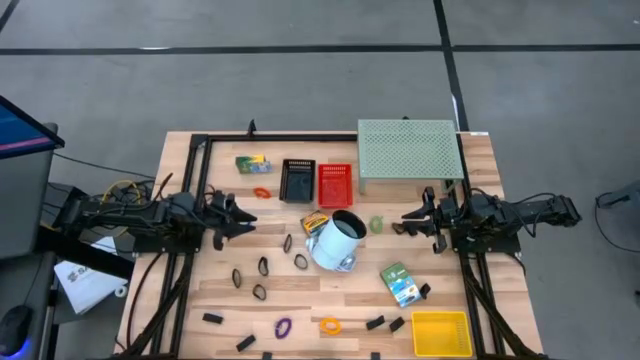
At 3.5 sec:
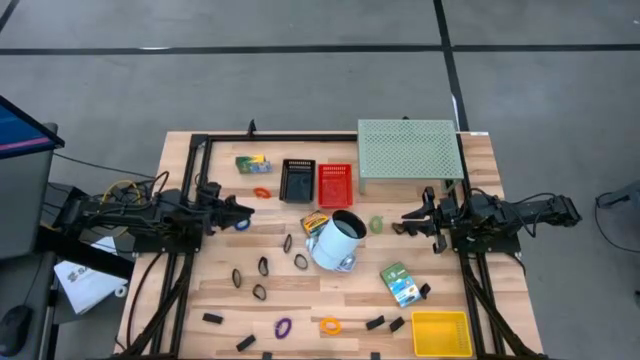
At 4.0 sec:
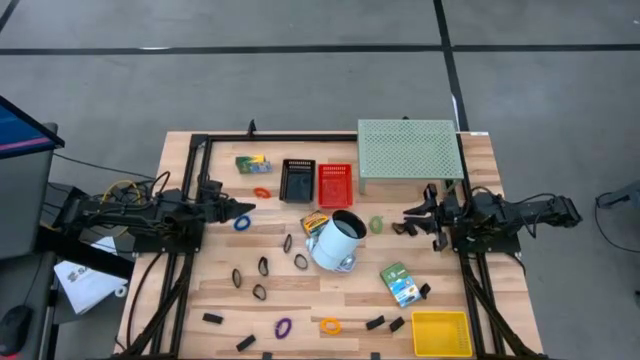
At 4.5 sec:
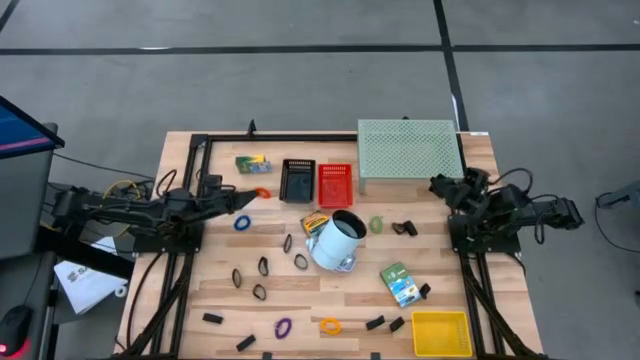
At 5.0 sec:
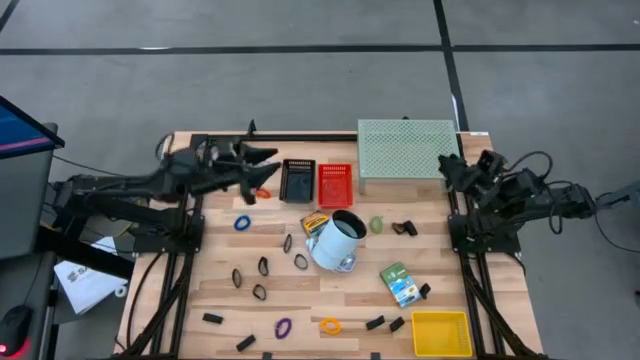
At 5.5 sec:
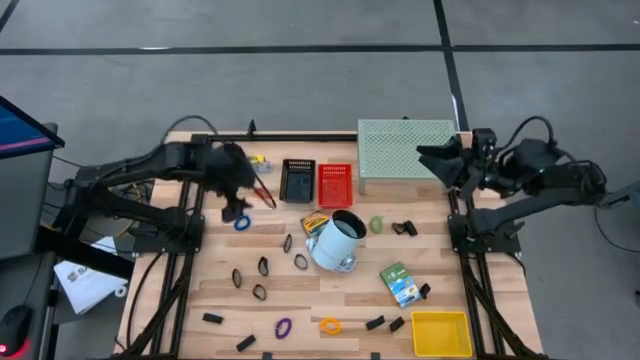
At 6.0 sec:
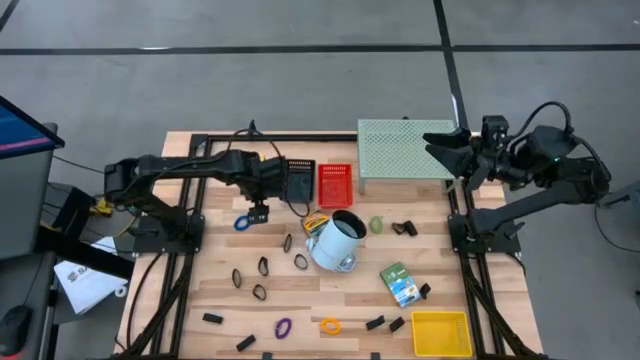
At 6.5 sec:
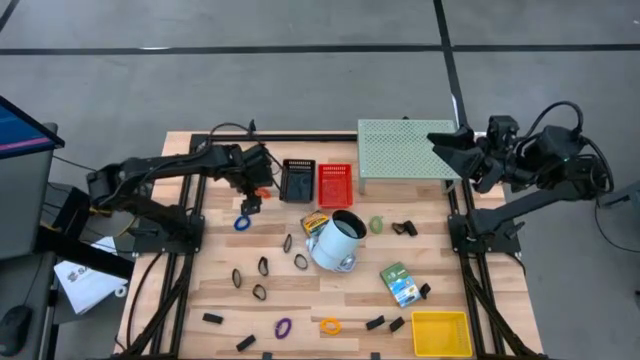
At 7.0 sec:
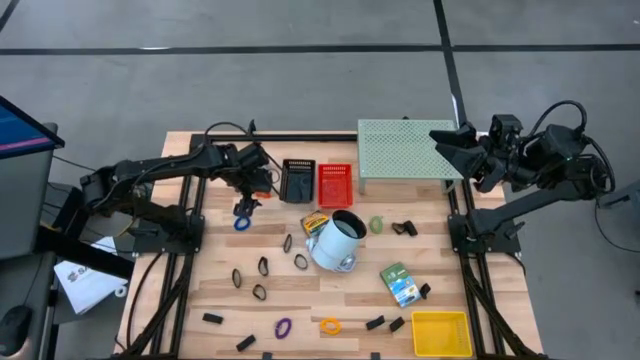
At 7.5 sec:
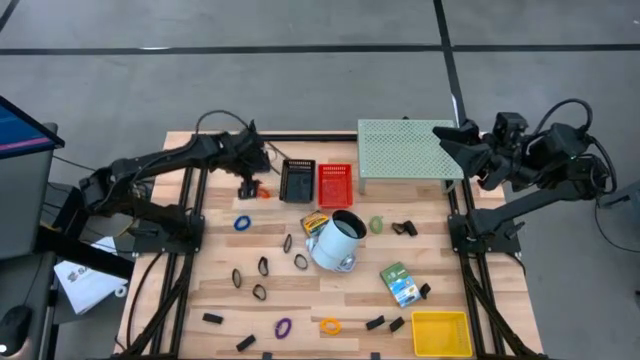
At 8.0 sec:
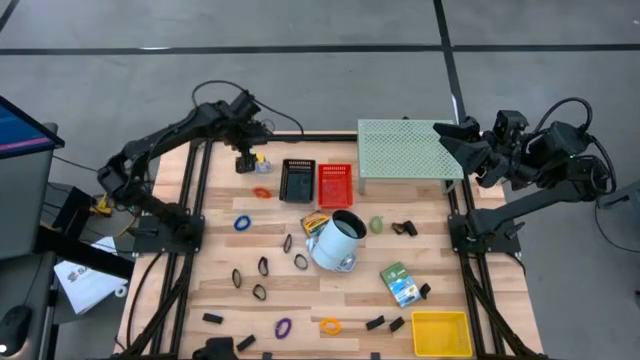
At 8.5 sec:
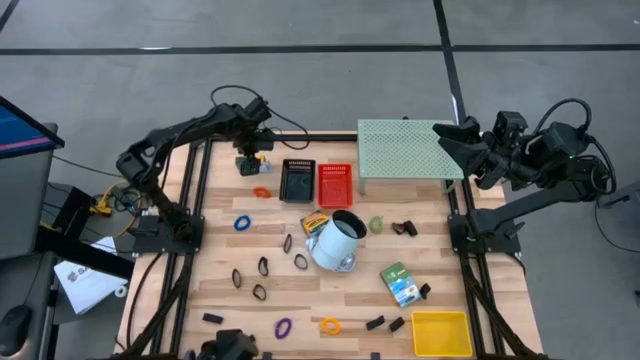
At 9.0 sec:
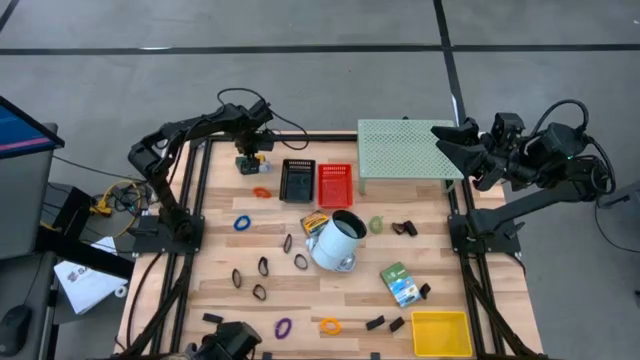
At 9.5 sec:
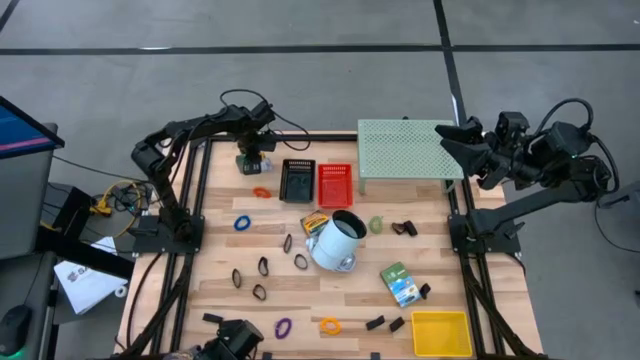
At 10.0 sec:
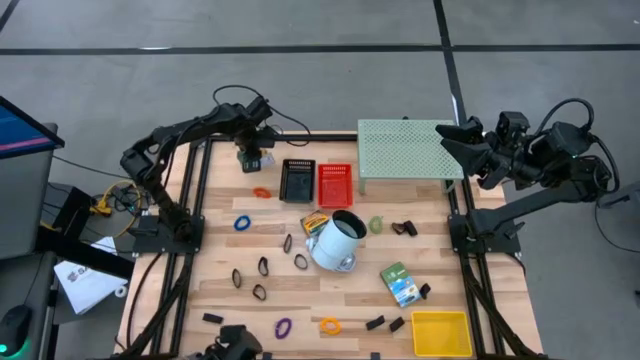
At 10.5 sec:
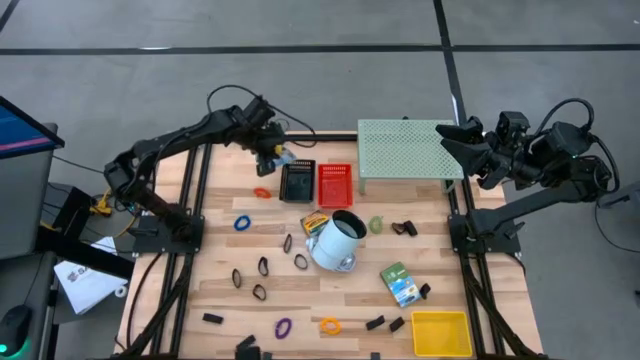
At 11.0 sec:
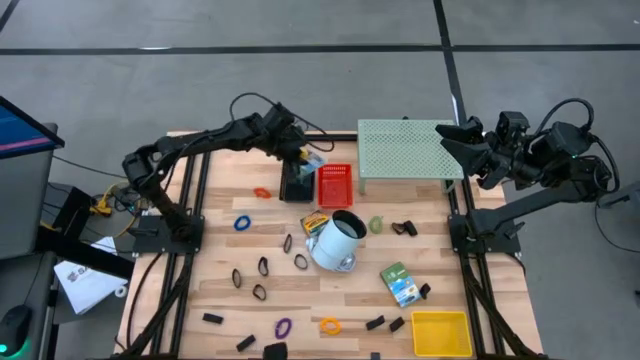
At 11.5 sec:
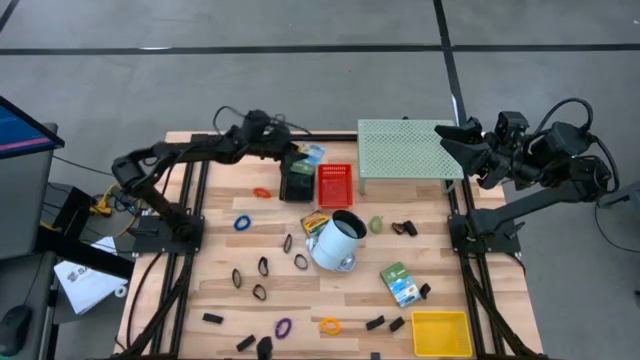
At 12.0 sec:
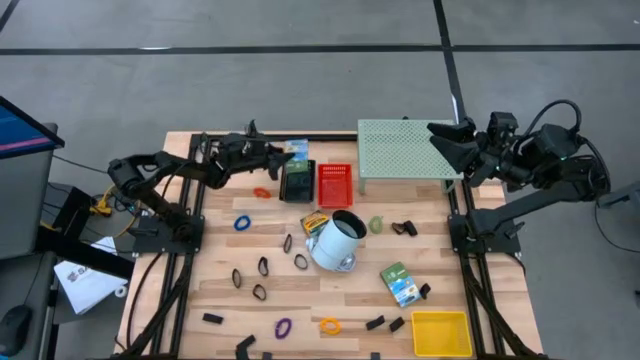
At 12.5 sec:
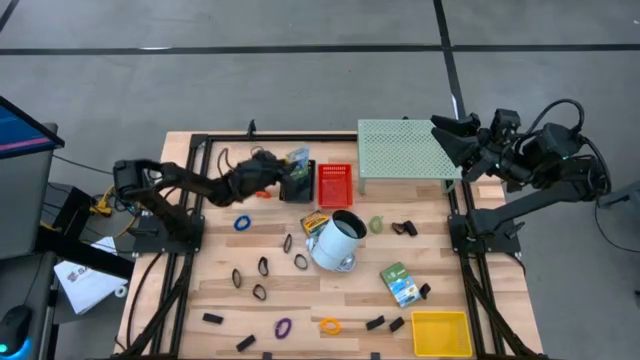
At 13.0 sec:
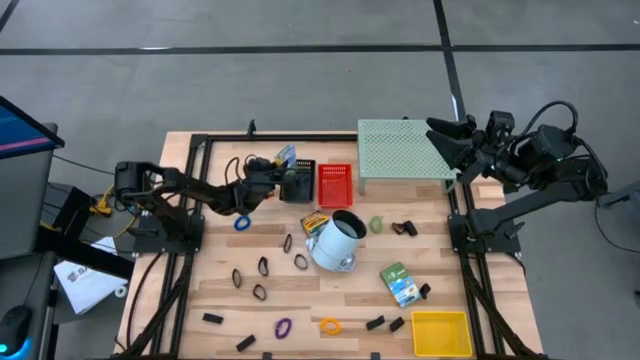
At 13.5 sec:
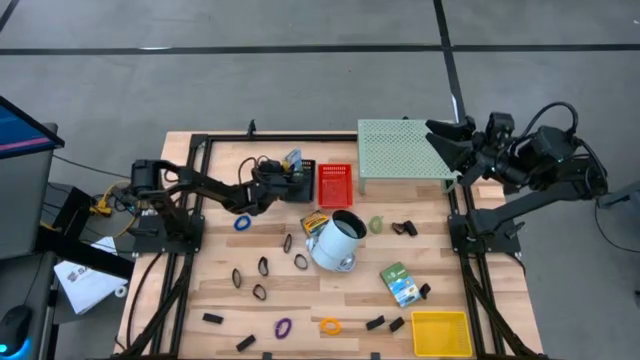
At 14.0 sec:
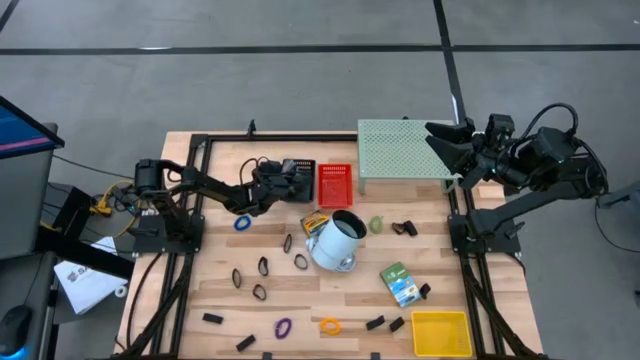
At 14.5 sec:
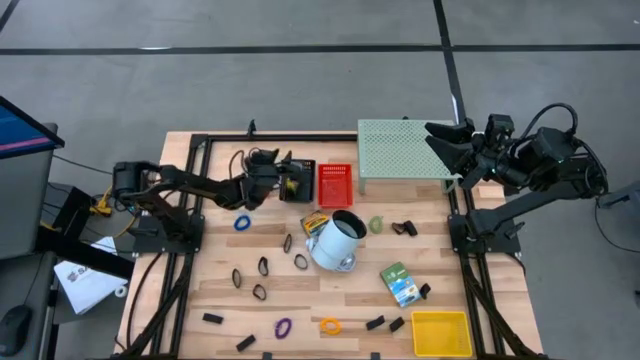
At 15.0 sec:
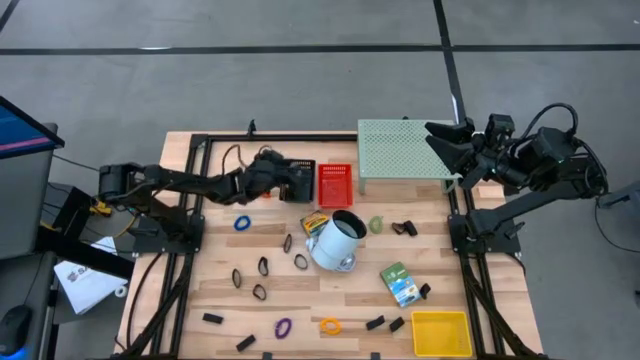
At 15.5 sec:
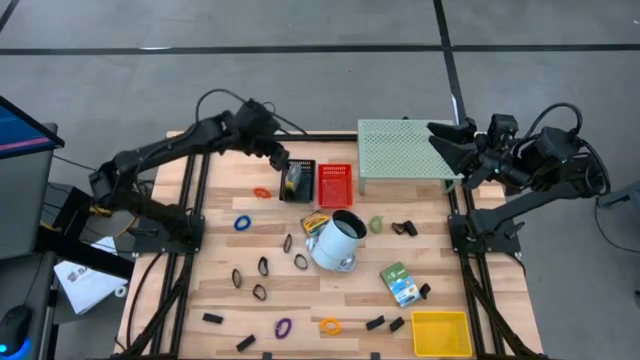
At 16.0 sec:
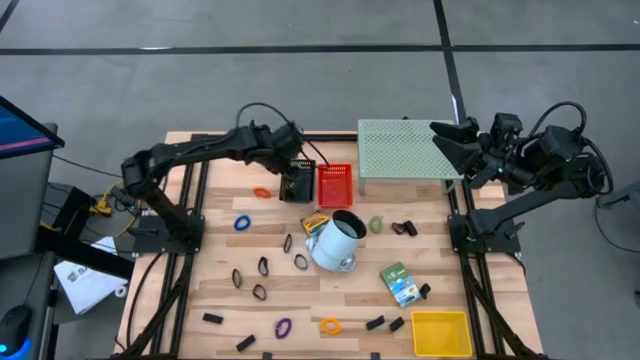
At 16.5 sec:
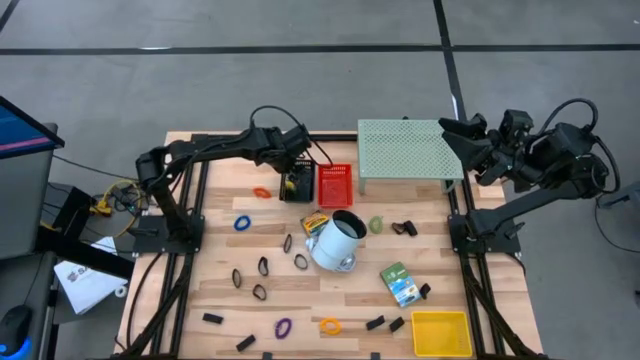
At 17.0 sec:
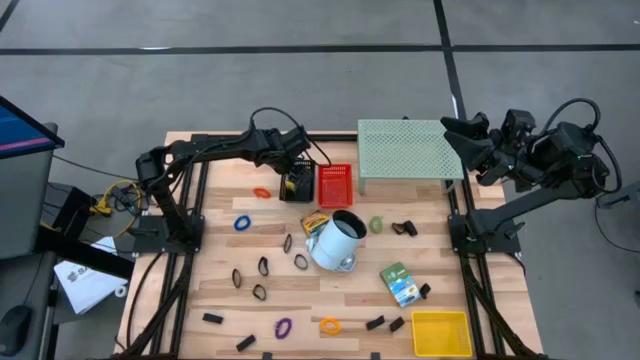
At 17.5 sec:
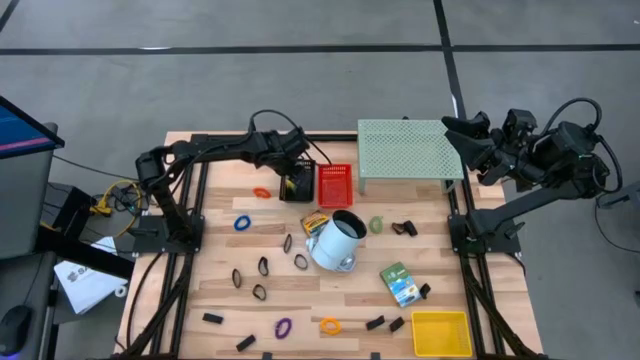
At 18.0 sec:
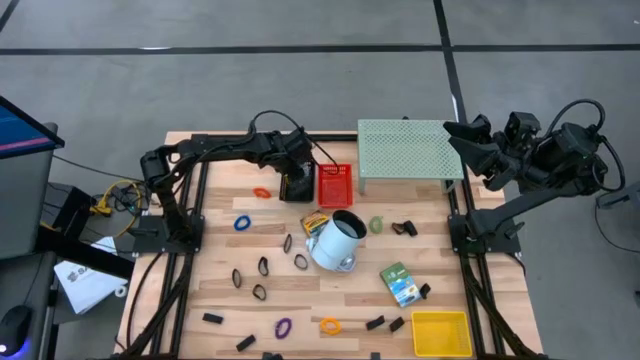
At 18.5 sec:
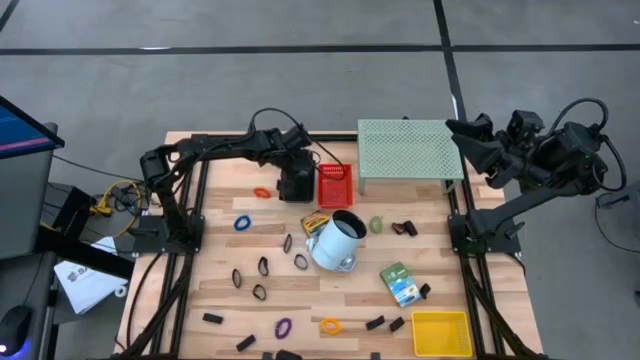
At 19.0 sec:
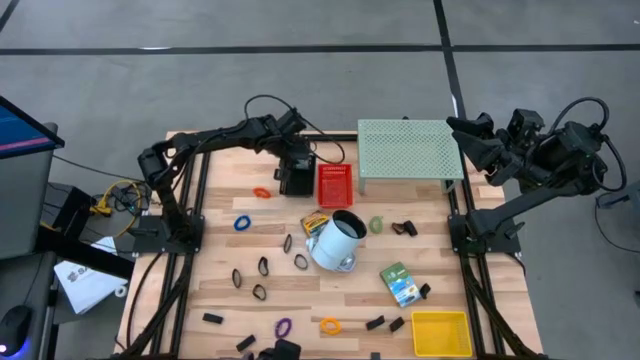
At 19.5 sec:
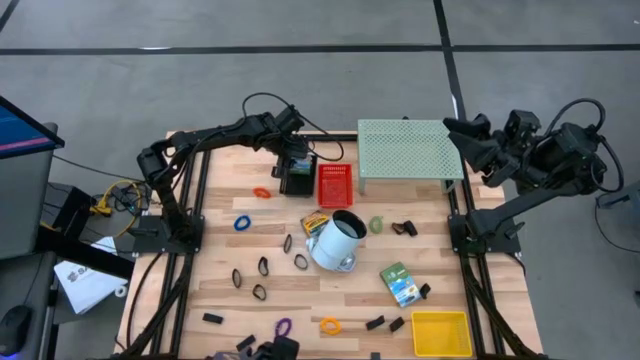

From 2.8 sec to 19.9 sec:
Task: Pick & Place Office Desk Supplies
Put the crayon box into the black bin

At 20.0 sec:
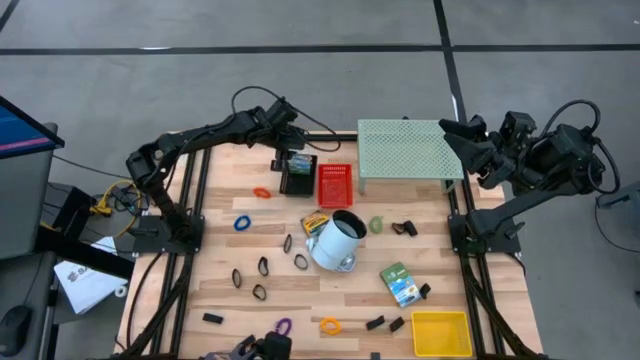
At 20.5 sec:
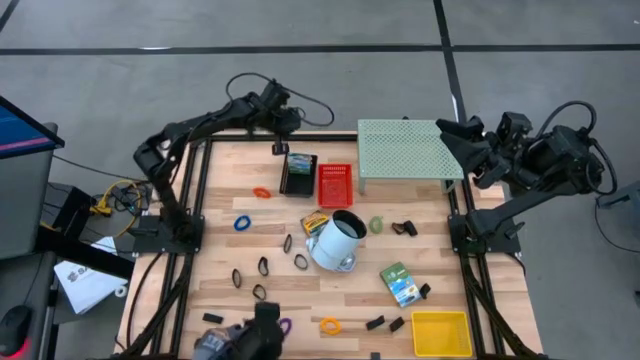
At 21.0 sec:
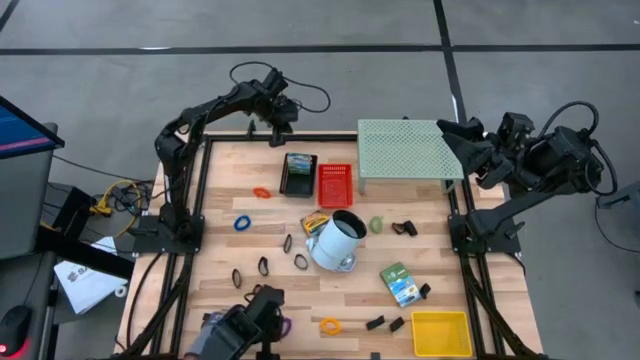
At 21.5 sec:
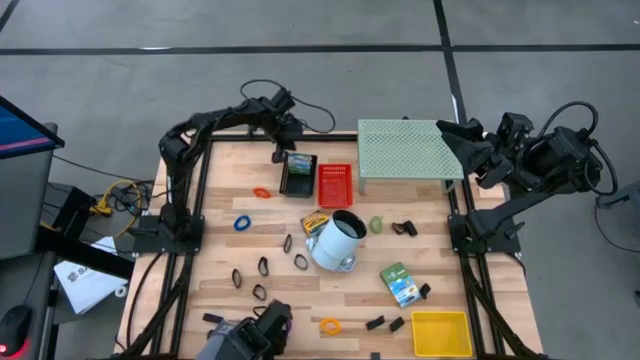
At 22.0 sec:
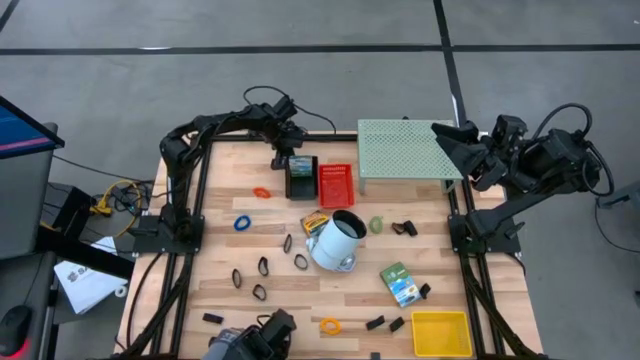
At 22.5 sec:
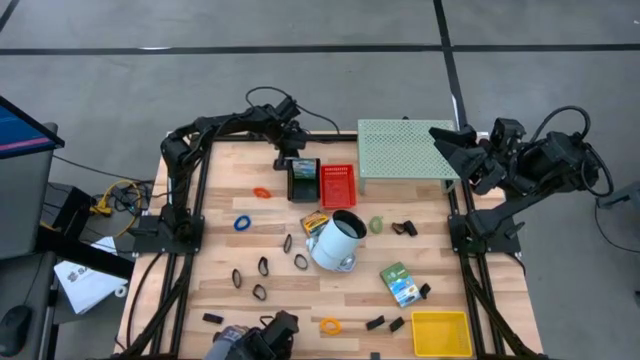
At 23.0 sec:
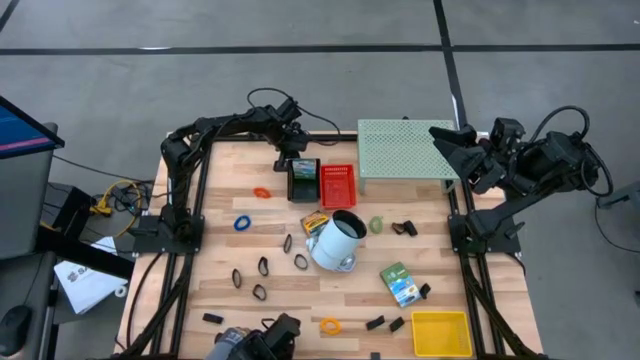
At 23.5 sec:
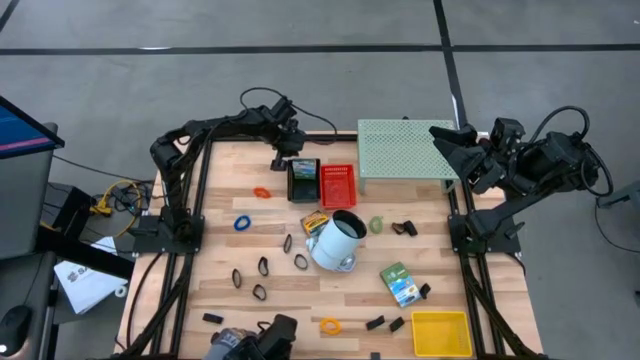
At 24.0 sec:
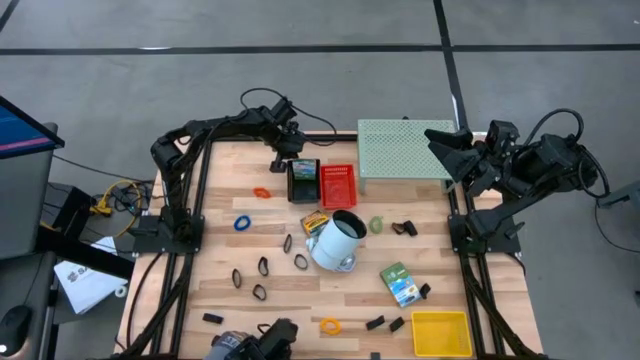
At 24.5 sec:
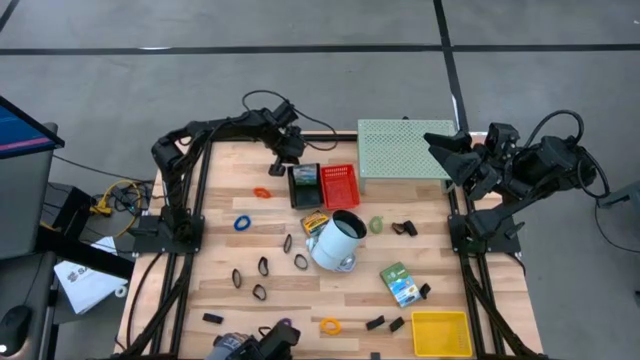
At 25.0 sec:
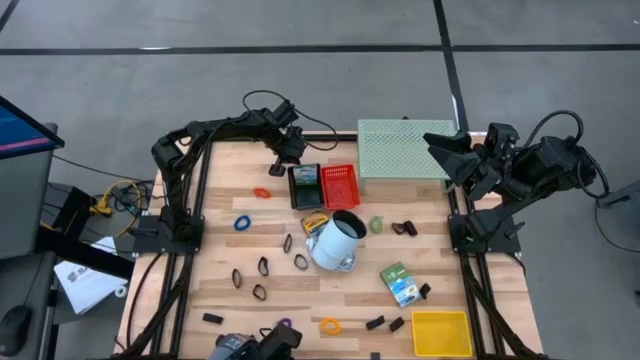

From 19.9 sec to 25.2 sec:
Adjust the left black bin
